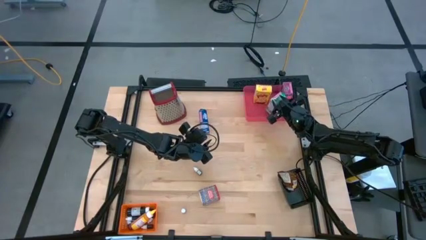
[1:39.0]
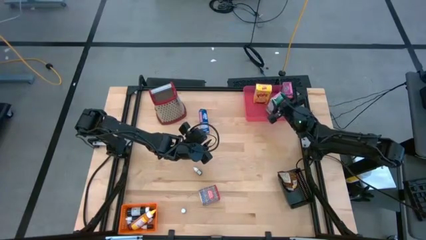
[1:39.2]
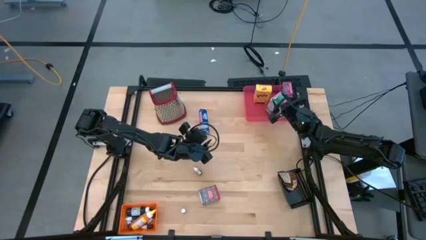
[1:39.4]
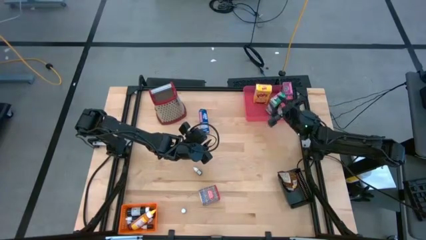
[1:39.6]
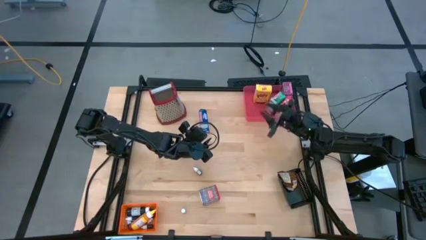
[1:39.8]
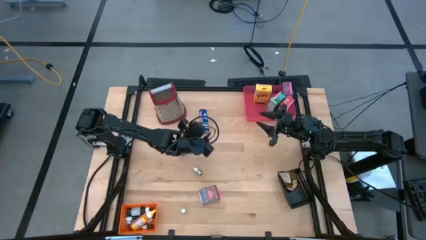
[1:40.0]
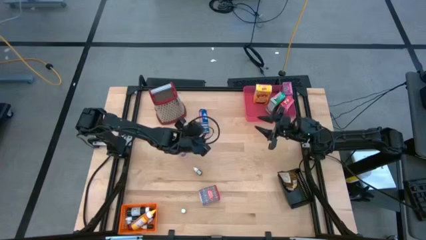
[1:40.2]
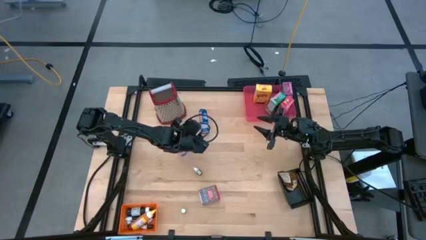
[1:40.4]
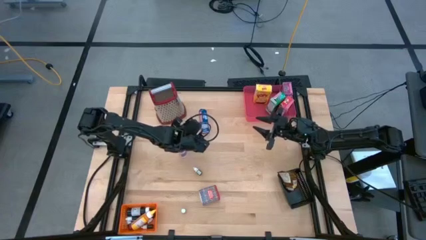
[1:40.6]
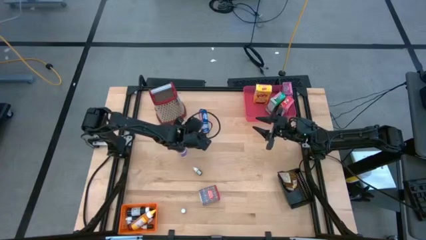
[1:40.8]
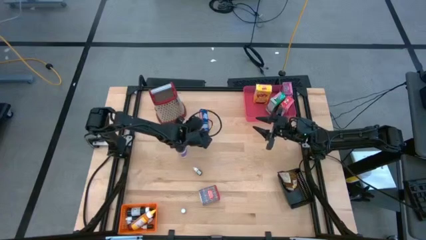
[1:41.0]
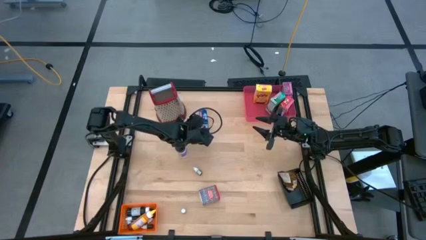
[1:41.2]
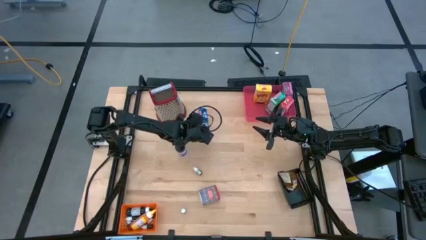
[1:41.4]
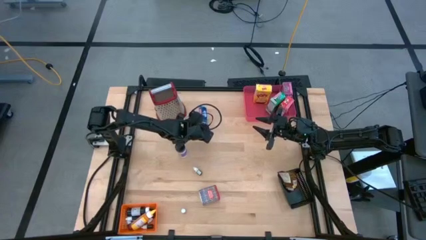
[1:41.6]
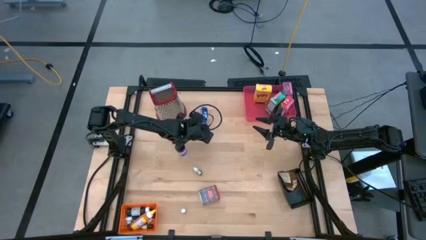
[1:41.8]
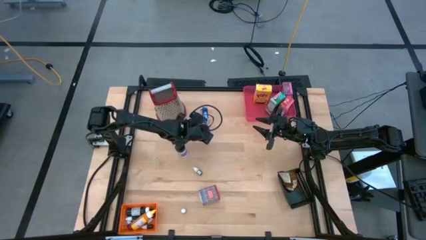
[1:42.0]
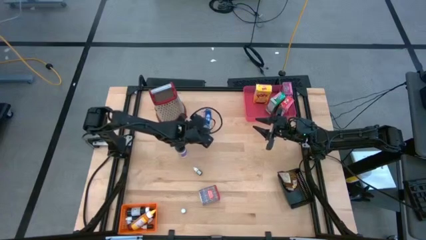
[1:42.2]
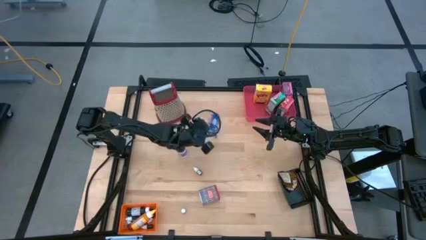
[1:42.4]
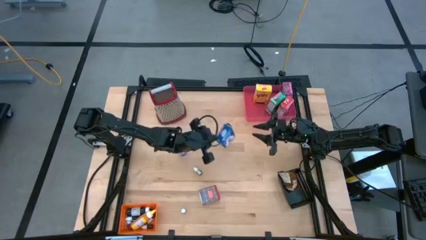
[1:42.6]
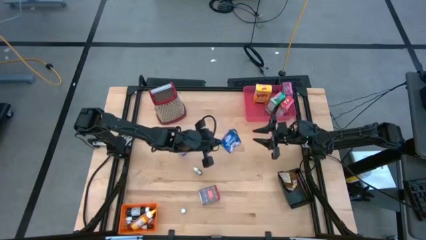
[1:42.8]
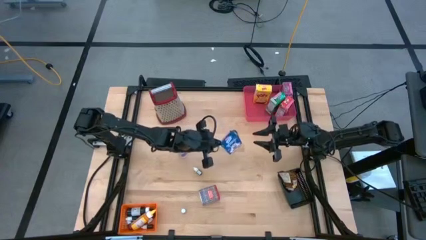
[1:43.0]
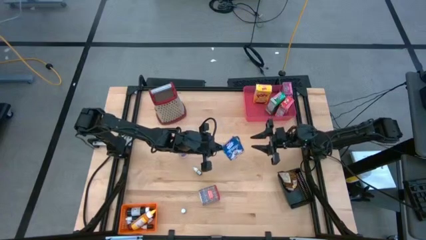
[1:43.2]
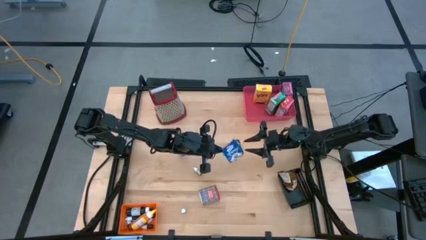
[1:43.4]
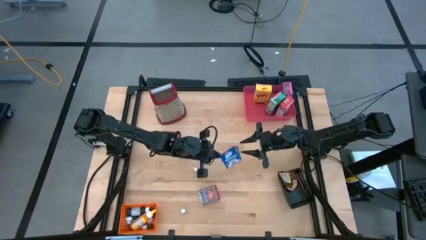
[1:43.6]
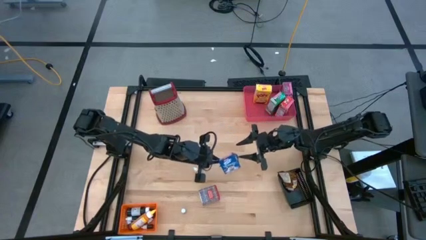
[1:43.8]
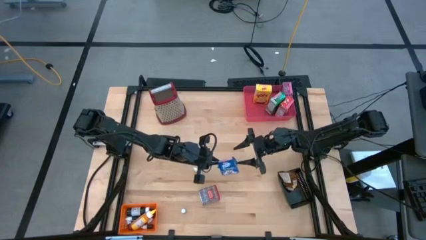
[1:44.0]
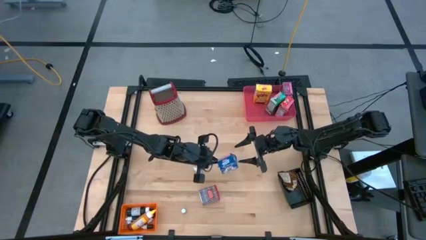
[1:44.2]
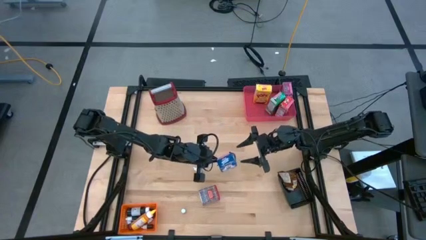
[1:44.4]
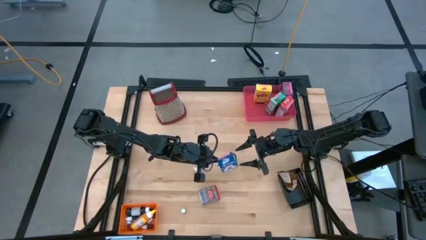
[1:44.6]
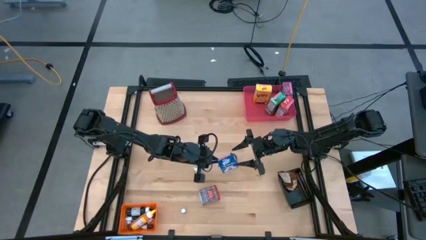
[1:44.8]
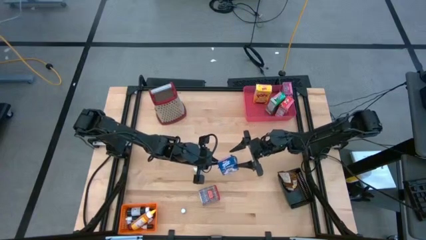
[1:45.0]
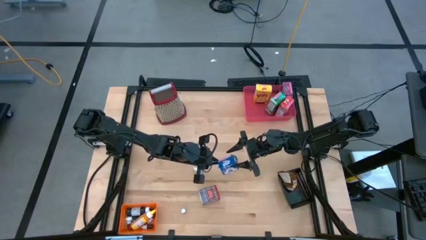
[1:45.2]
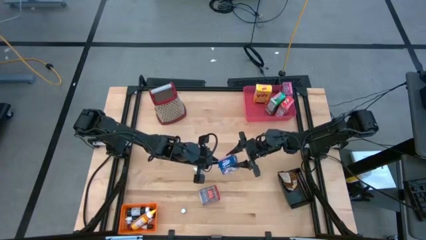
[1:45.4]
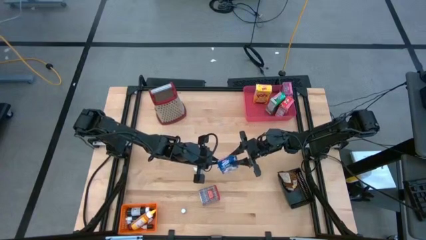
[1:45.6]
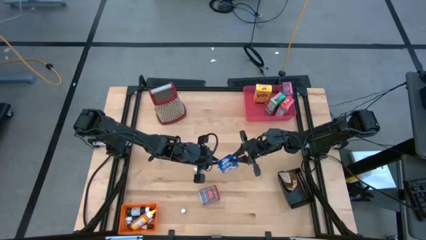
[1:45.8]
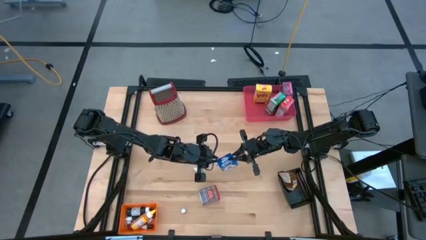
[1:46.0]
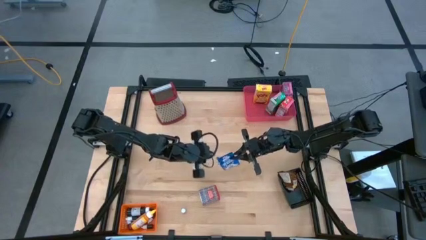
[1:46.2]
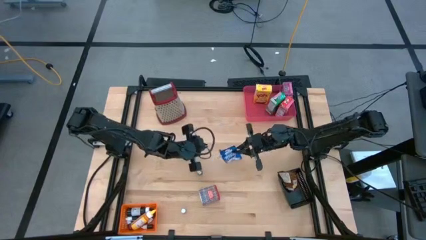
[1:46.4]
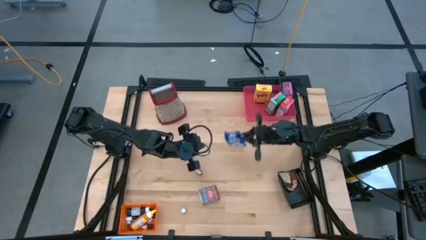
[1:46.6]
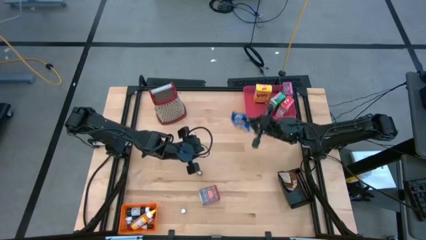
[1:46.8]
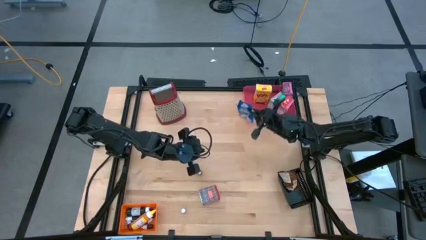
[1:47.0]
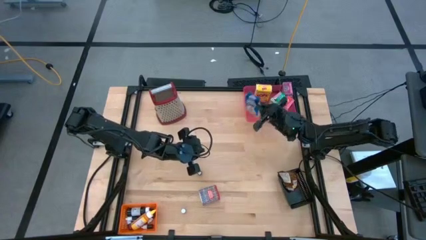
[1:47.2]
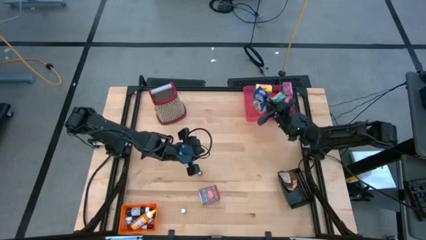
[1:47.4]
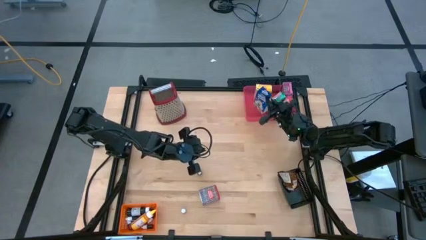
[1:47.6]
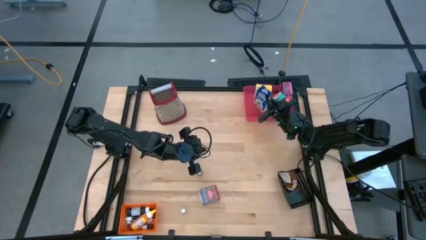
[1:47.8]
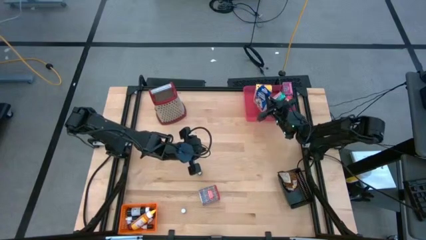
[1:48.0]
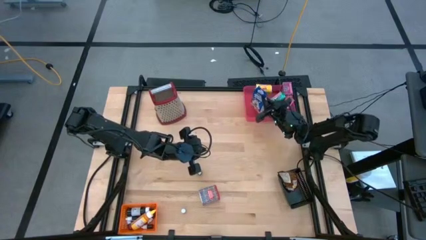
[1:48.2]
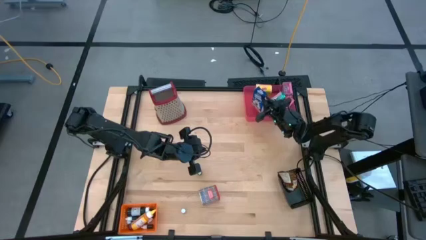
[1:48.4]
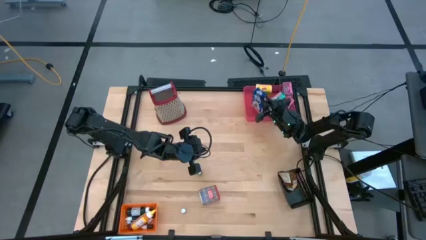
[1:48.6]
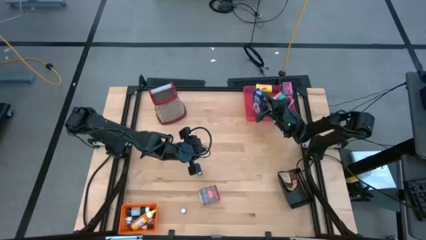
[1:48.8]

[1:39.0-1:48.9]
Task: Pick & Place Kitchen Items
Put the blue cereal box into the pink bin

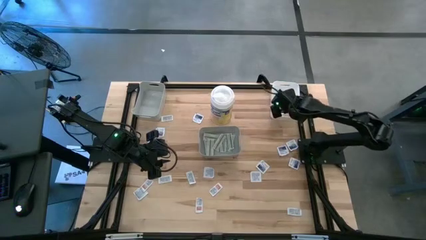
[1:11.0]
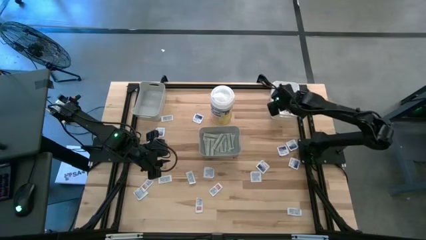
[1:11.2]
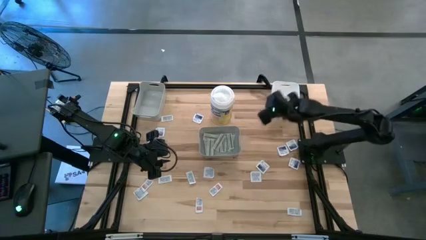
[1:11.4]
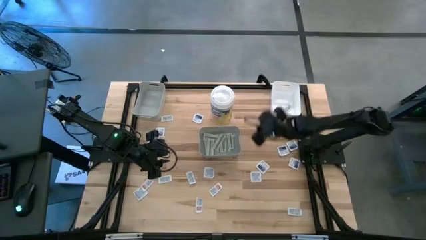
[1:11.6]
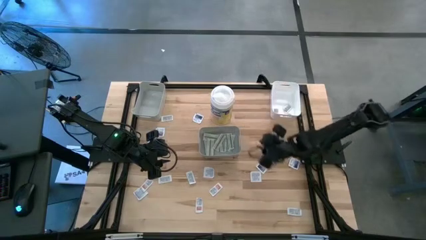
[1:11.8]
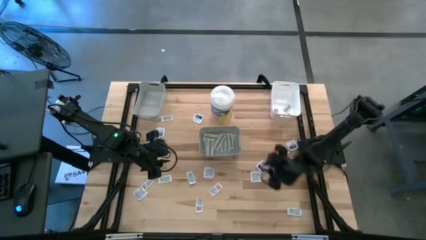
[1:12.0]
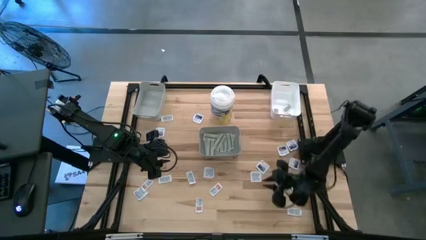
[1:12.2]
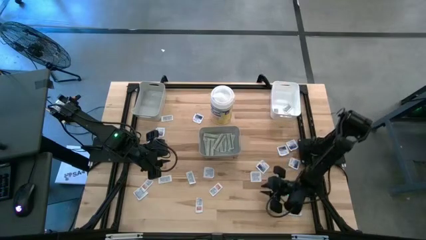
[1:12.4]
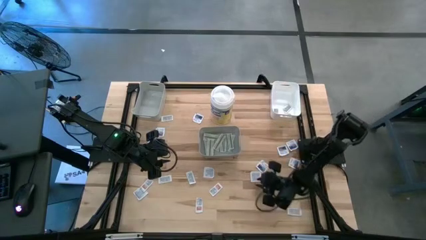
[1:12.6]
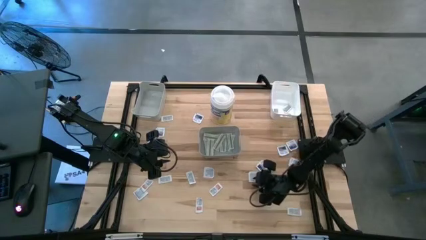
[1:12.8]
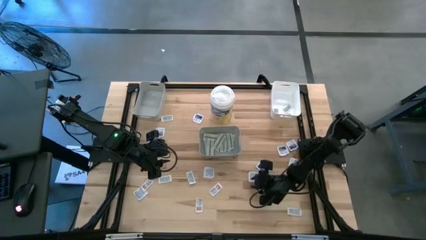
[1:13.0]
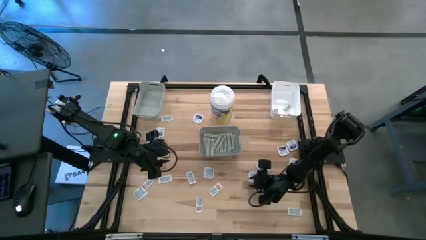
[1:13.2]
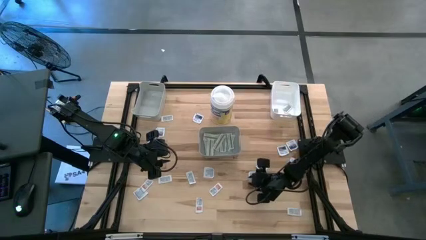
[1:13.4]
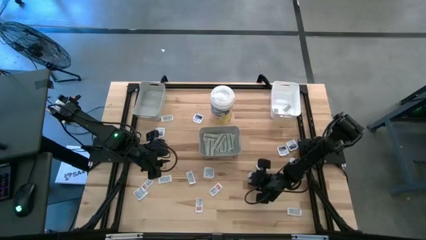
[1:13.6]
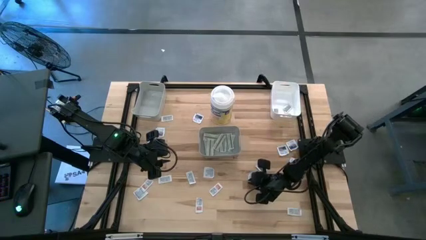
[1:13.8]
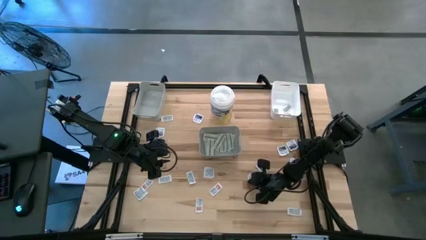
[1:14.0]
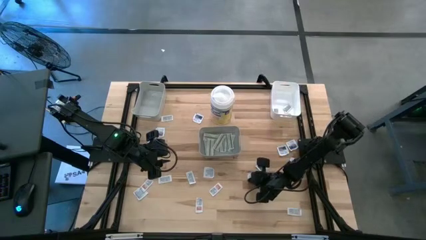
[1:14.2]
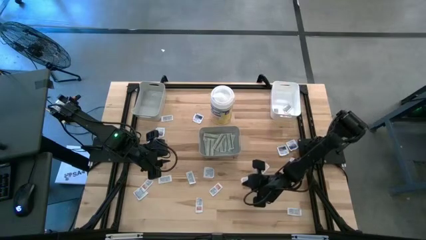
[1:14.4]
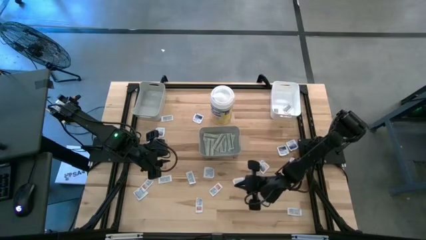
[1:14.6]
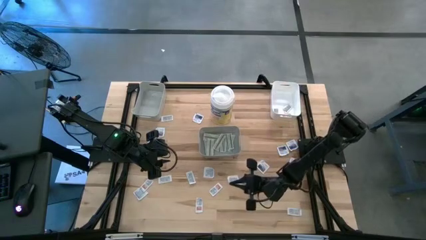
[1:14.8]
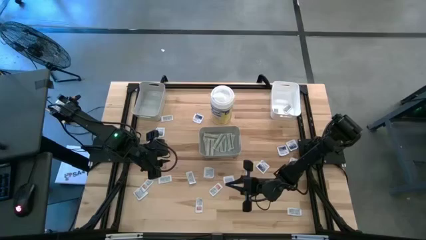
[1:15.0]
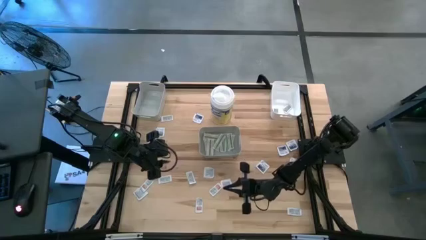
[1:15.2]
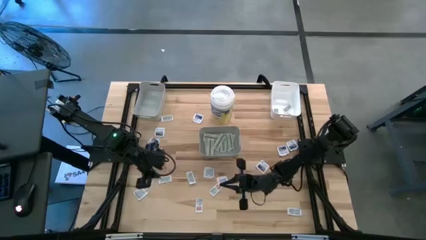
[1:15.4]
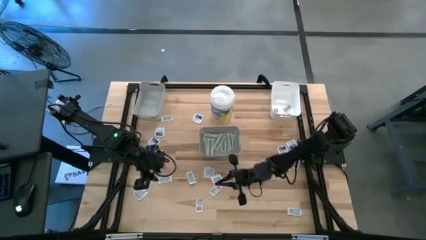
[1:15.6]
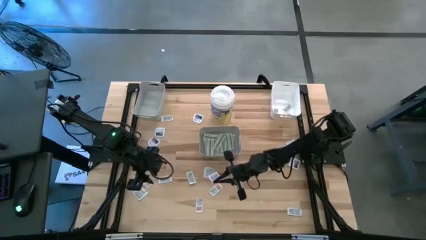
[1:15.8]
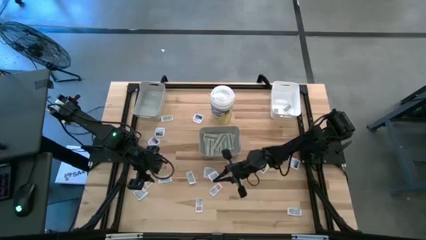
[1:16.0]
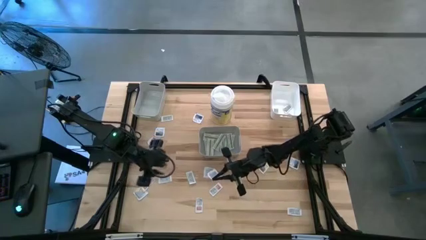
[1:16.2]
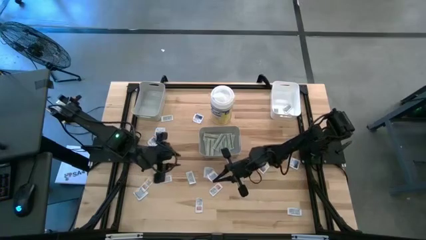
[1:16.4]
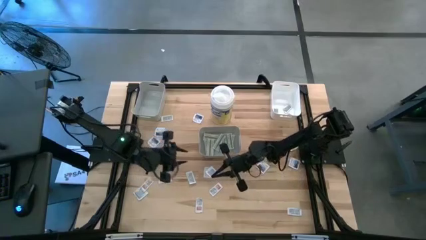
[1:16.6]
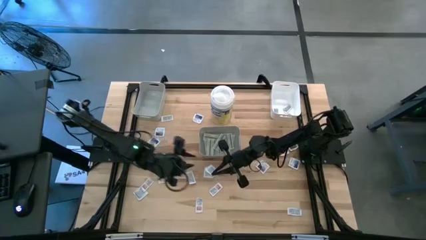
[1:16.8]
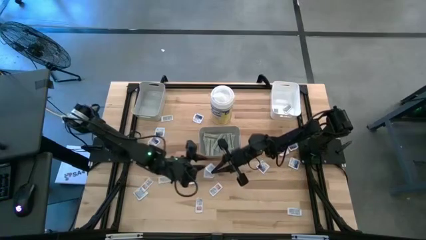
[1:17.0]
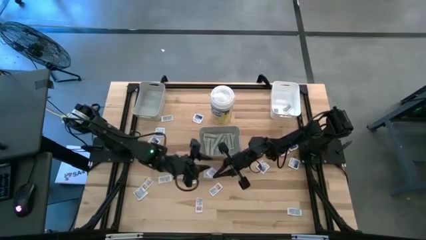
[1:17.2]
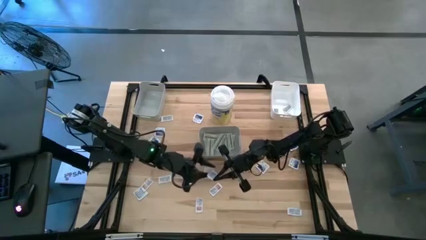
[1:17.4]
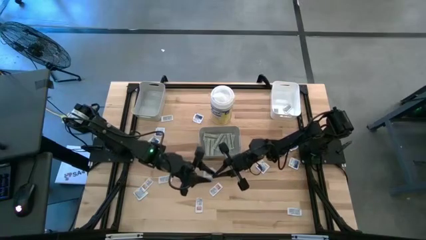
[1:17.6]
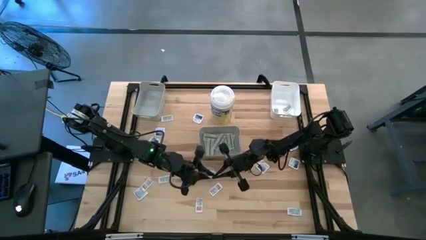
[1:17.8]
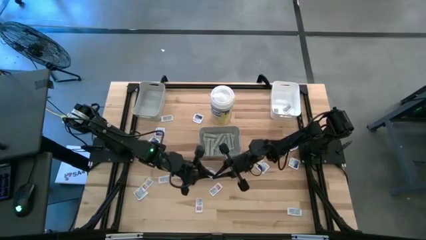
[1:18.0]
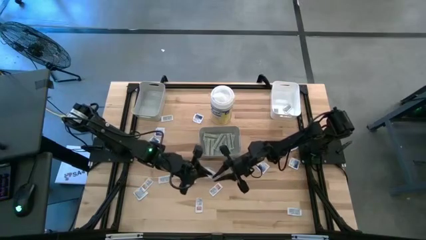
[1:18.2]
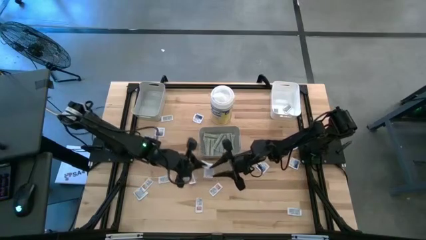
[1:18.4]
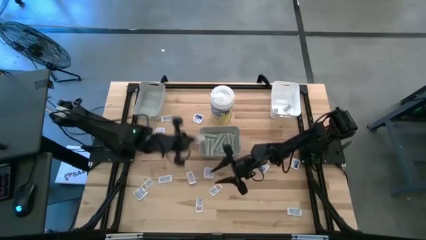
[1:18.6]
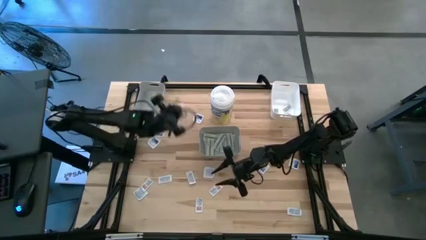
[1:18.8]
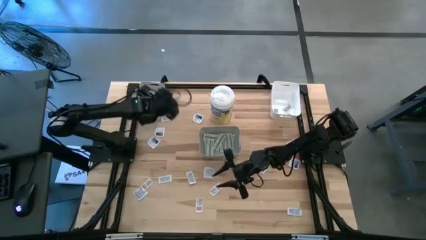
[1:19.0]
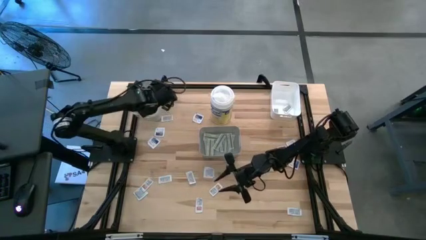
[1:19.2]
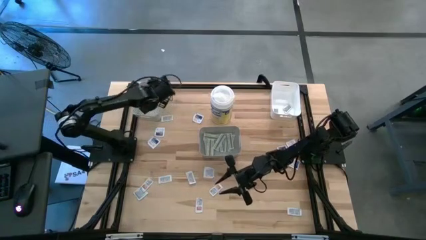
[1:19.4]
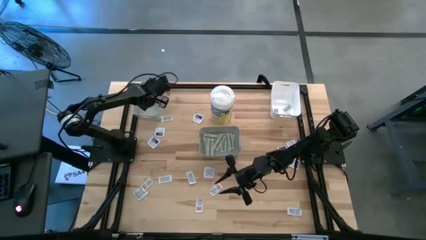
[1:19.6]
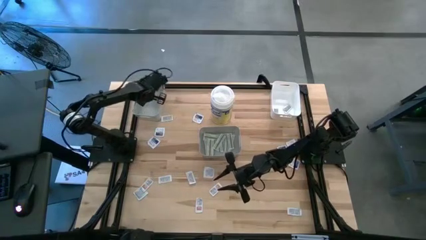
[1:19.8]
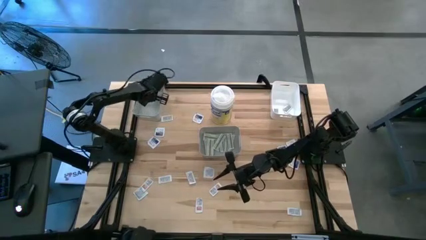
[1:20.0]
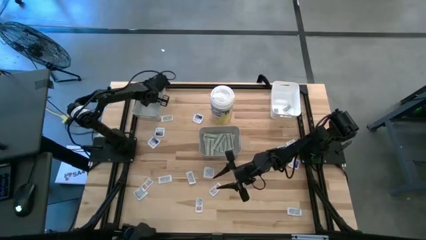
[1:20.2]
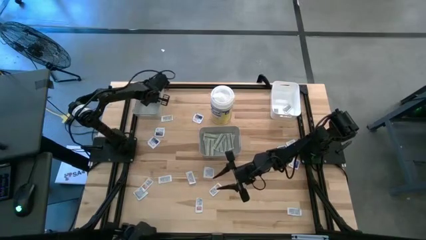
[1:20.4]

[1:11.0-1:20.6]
Task: Pick & Place First Aid Supplies
Put the alcohol pad into the top gray bin
